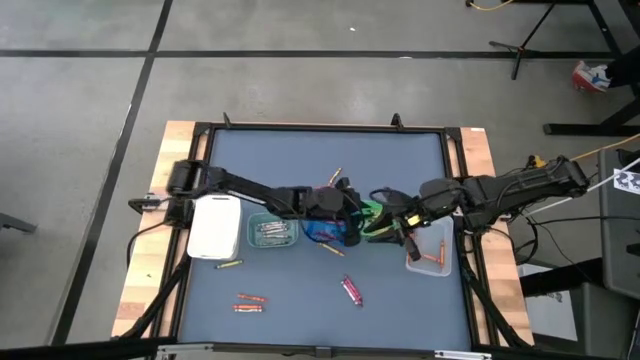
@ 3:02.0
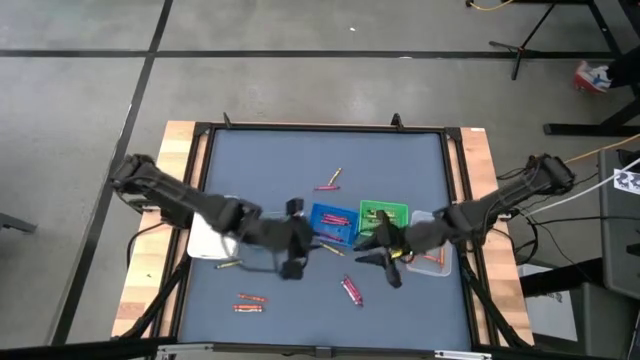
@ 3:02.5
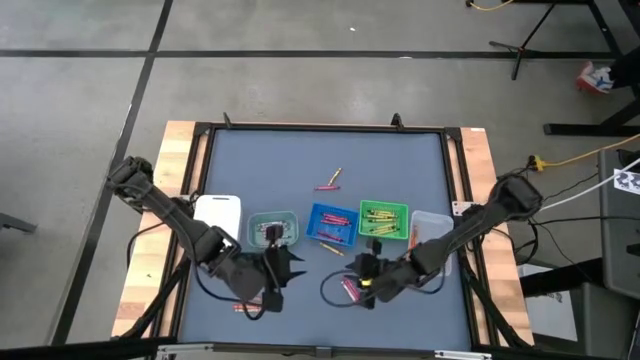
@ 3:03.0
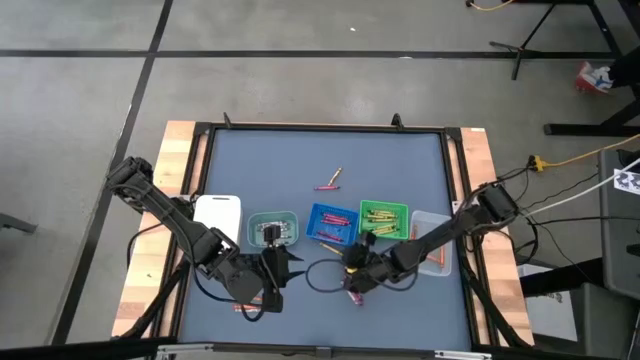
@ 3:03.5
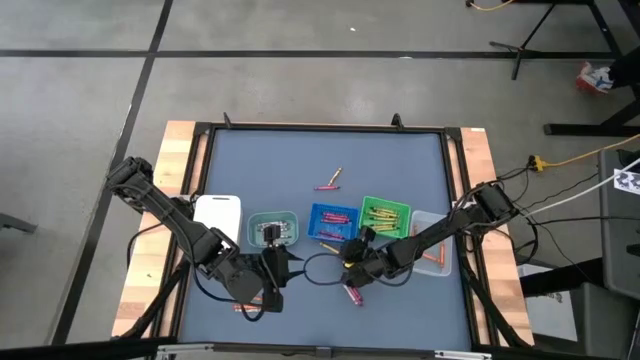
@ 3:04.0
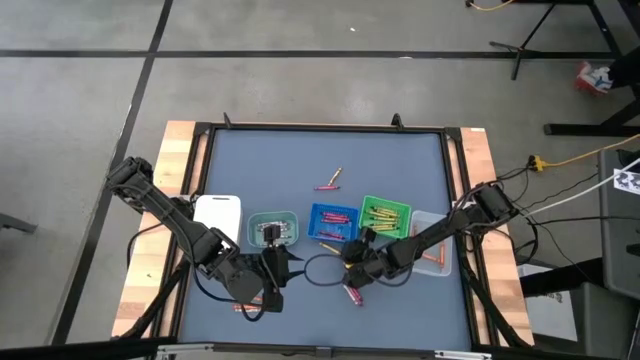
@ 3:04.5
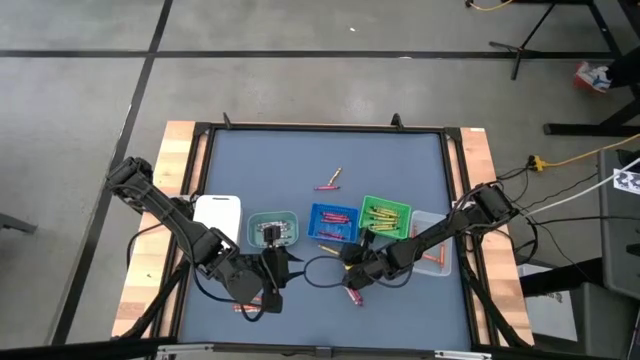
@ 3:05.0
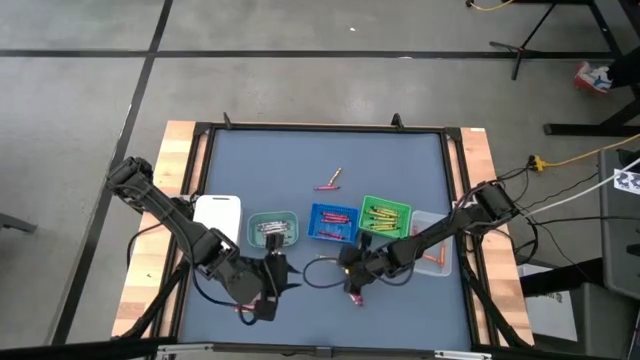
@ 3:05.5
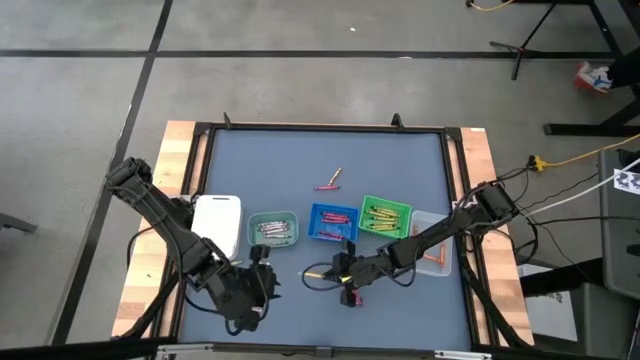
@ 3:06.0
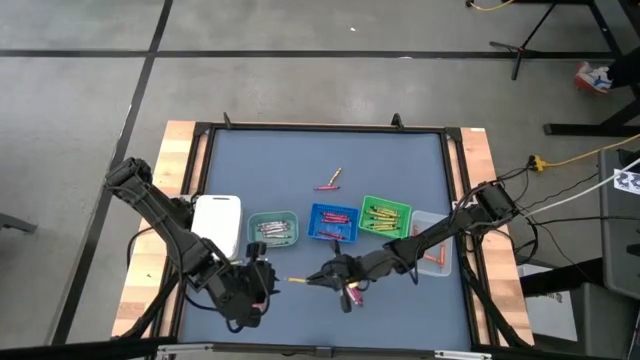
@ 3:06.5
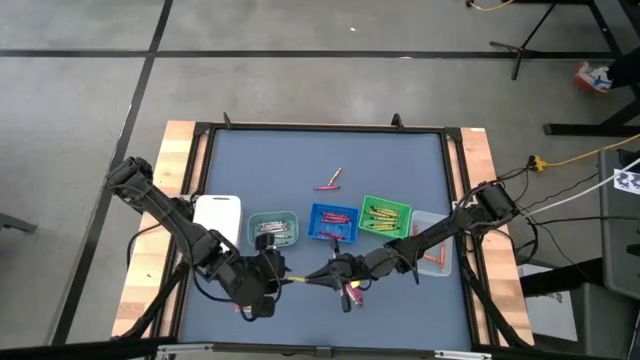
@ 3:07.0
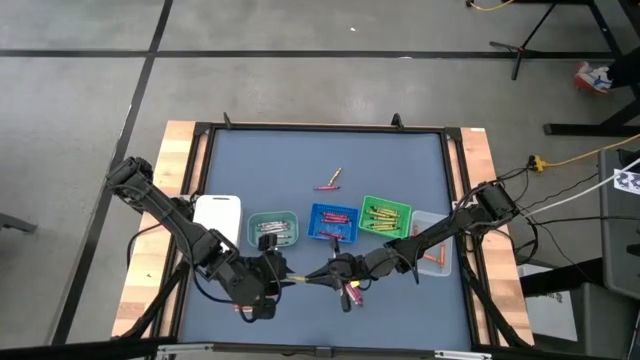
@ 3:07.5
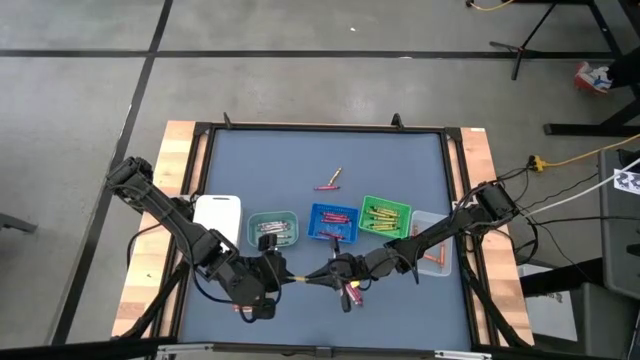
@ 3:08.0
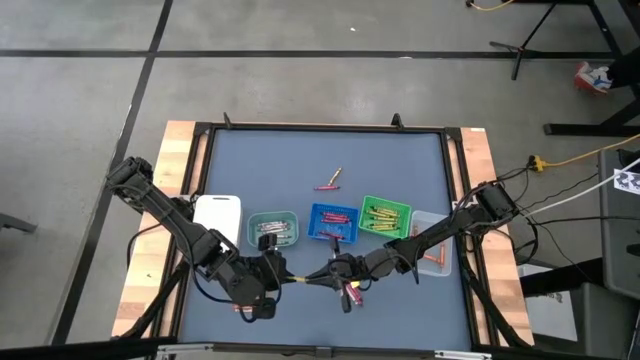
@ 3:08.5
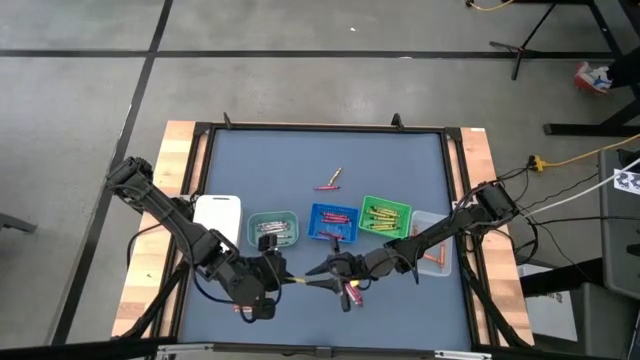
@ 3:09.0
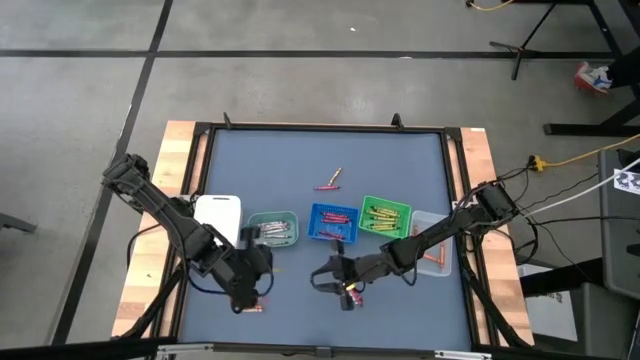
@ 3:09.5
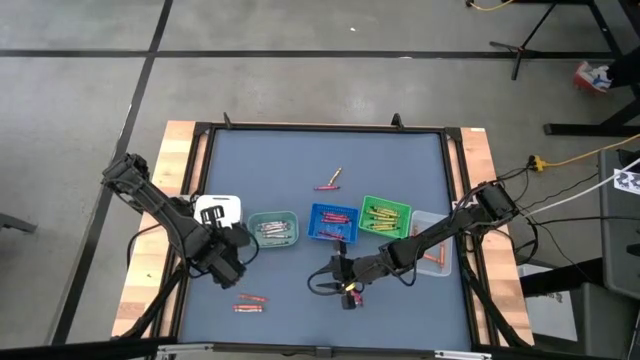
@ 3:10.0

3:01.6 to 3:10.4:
Task: Sort crayons
Put the yellow crayon into the white bin

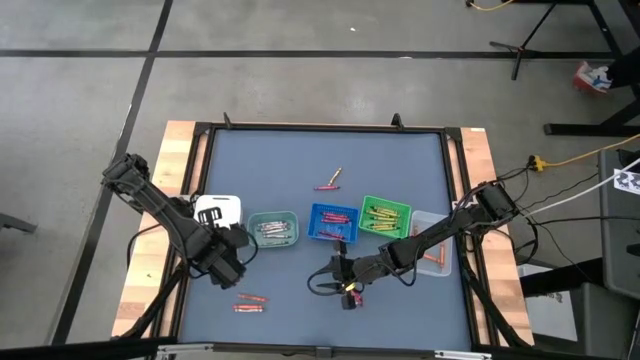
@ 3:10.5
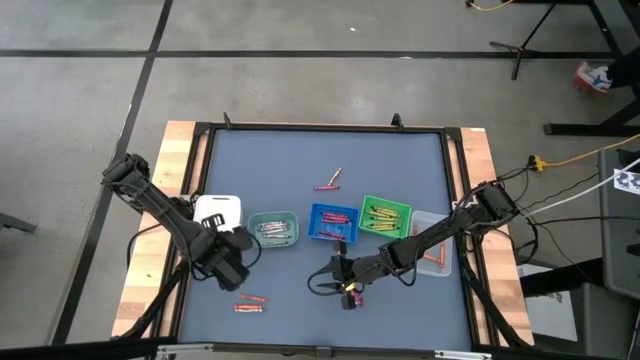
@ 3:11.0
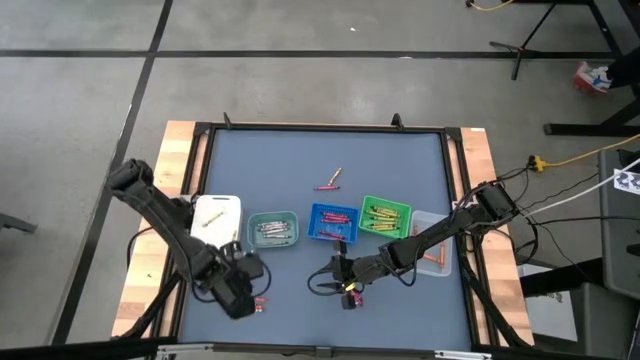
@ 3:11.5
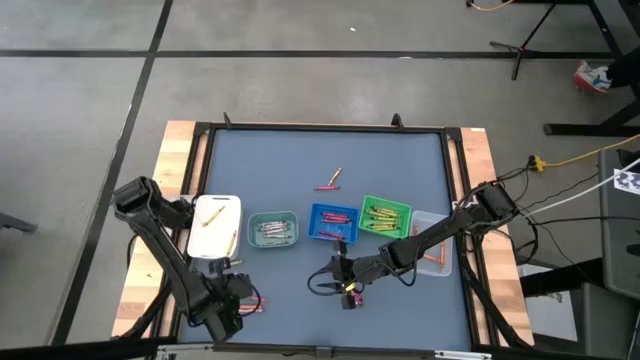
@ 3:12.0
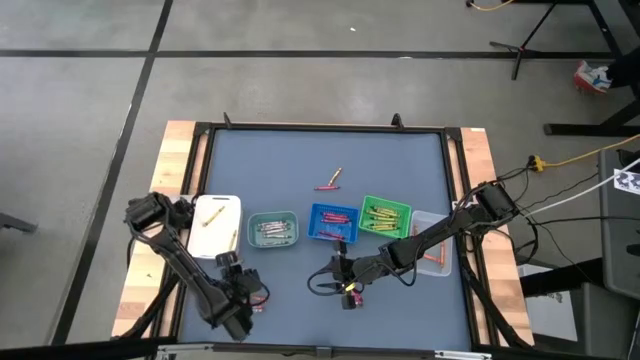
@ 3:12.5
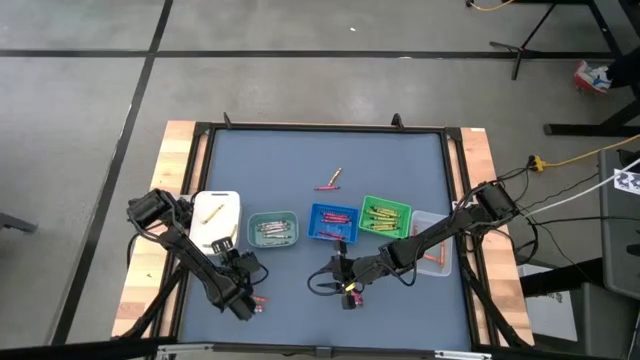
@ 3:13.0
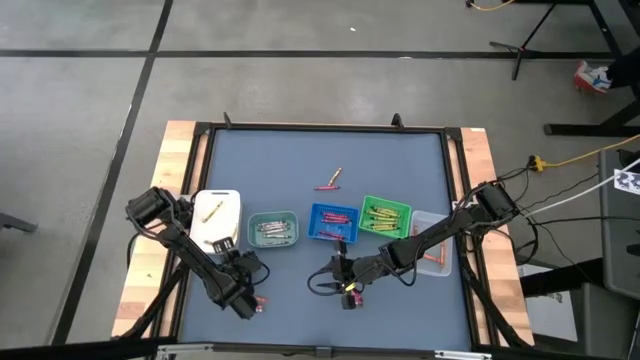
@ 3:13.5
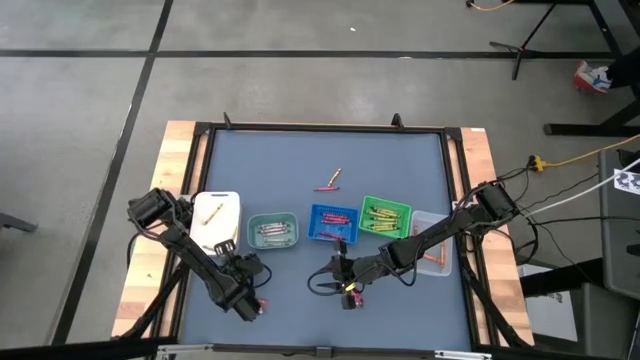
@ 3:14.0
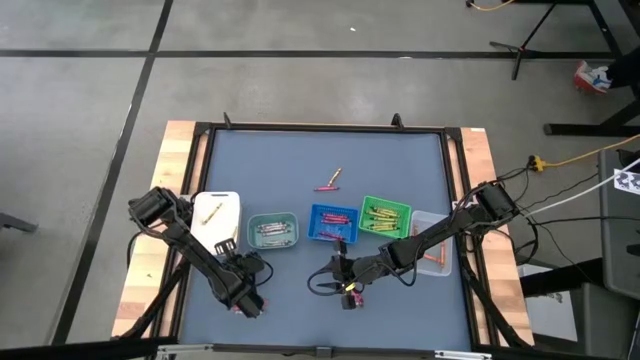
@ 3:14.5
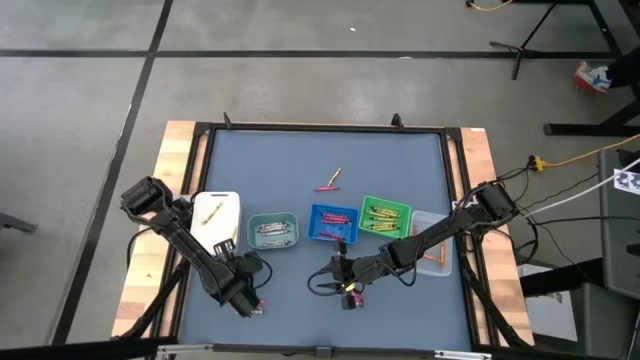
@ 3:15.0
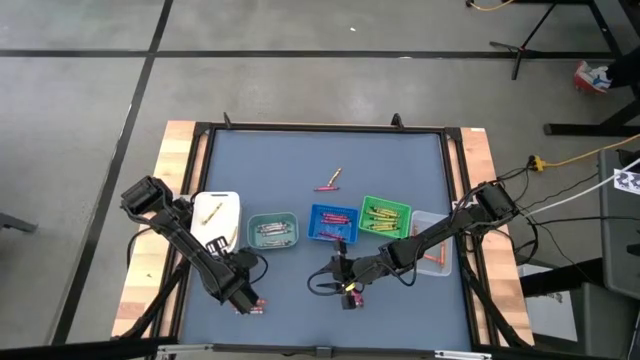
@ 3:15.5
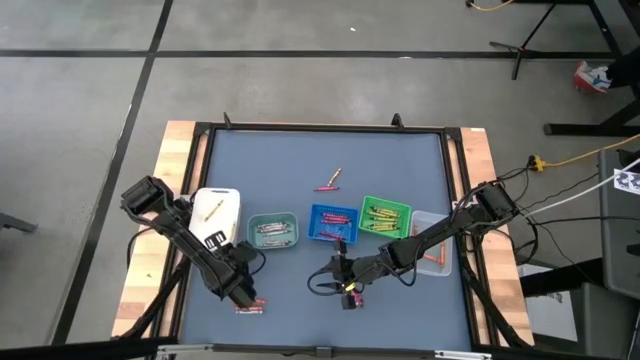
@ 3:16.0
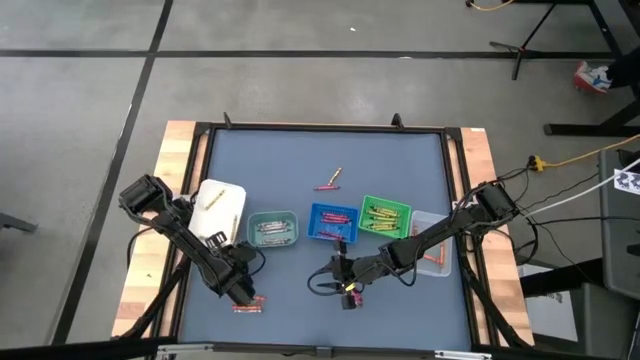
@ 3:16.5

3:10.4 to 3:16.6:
Put the green crayon into the green bin

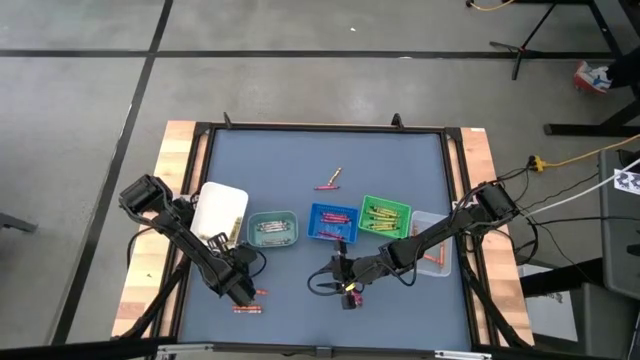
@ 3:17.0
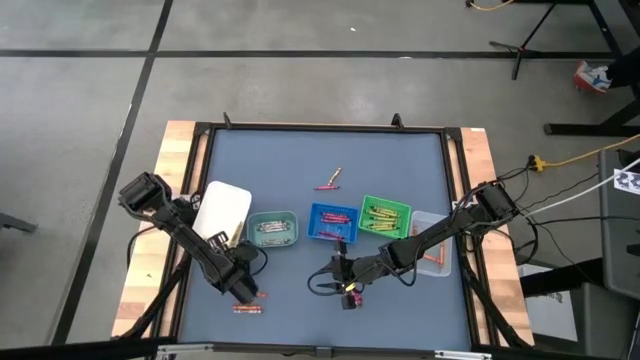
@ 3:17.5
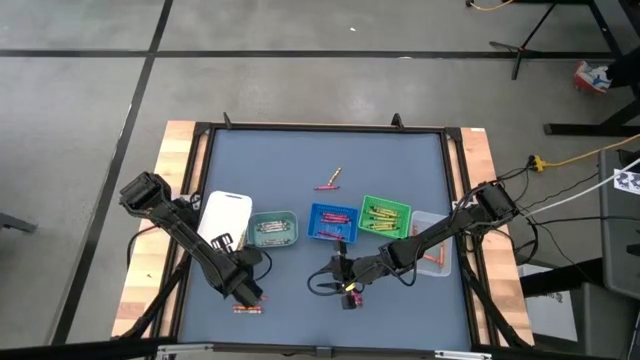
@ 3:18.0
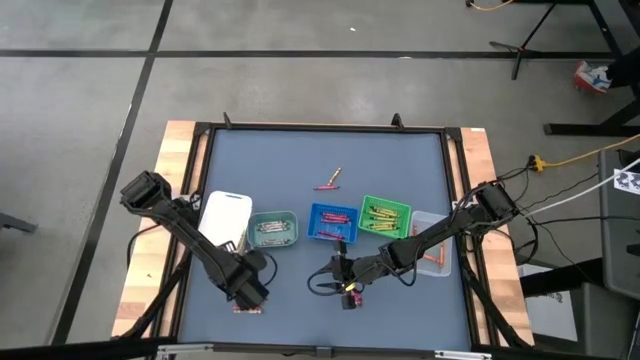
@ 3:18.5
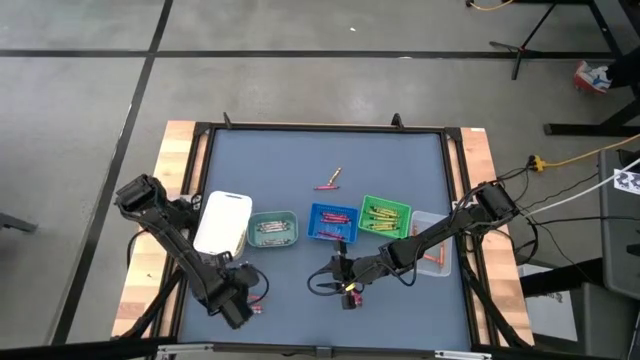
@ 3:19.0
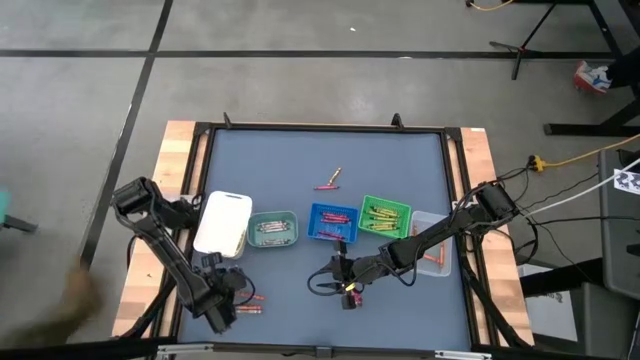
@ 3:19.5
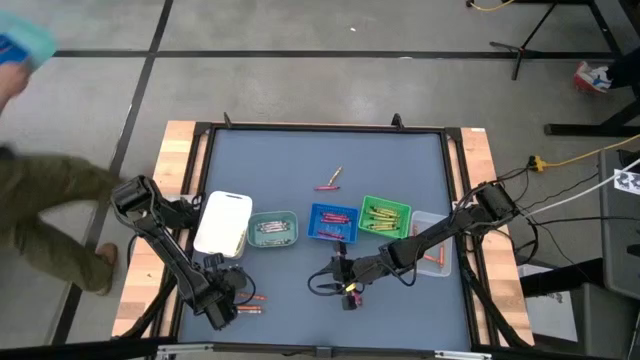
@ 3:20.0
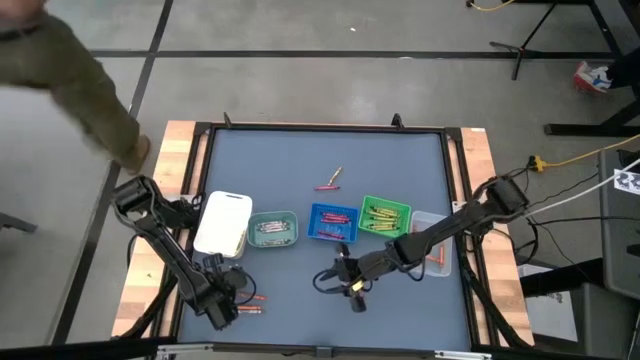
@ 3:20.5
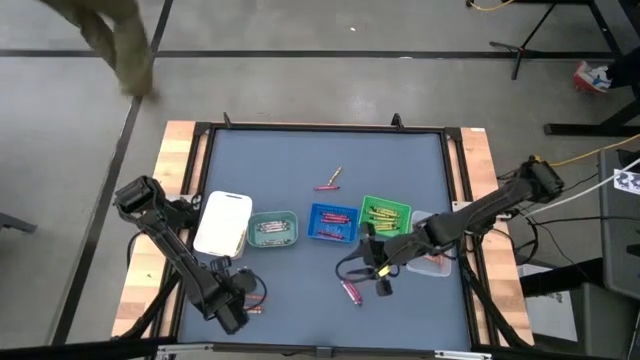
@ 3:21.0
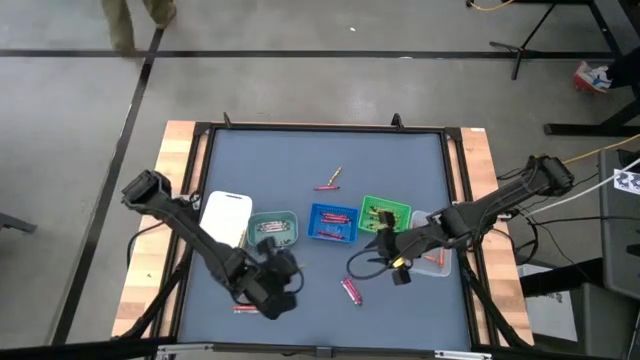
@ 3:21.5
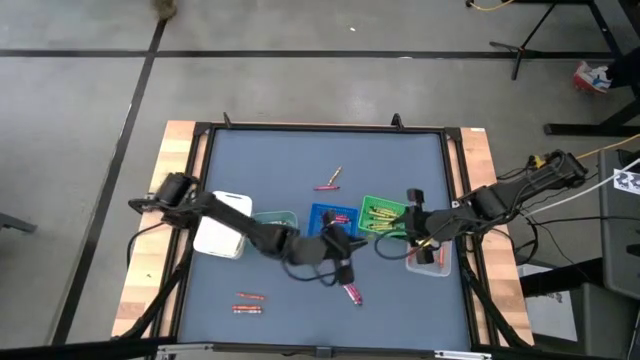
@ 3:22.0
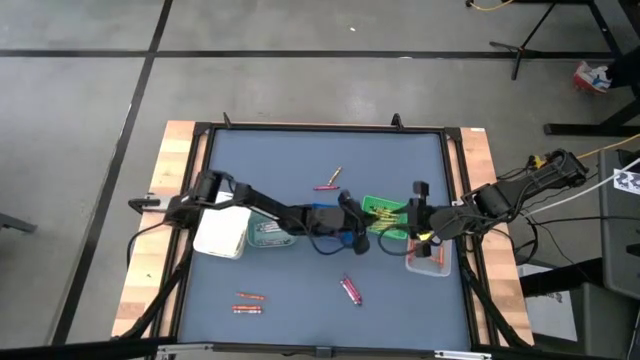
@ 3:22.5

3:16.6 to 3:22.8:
Put the green crayon into the green bin
